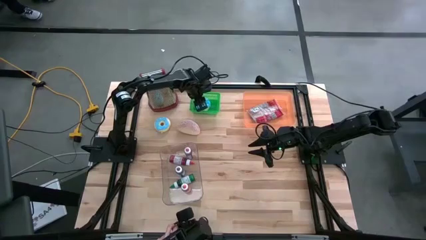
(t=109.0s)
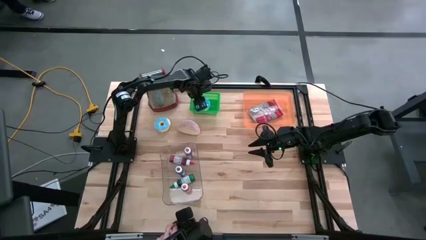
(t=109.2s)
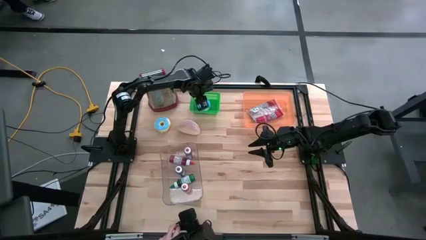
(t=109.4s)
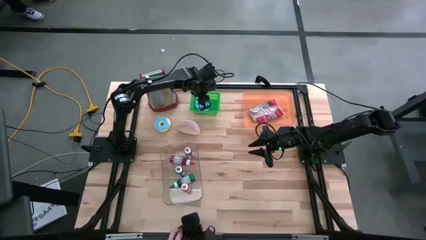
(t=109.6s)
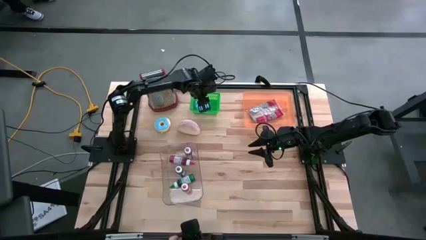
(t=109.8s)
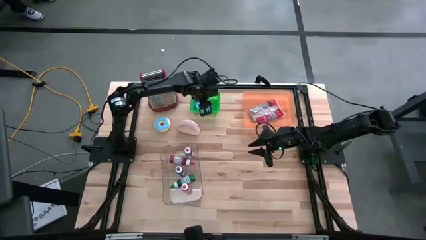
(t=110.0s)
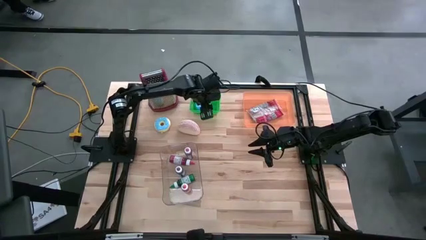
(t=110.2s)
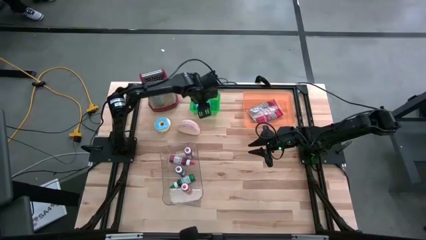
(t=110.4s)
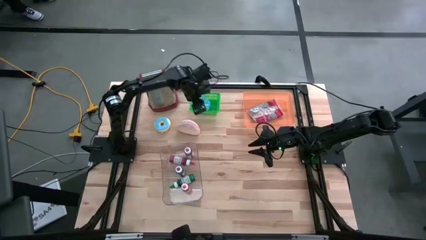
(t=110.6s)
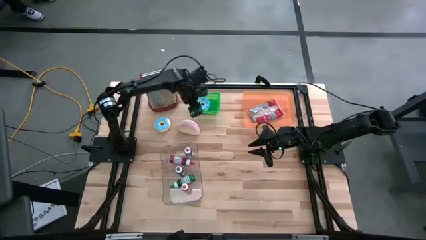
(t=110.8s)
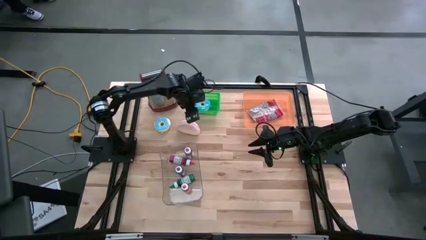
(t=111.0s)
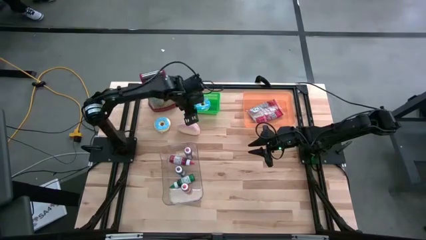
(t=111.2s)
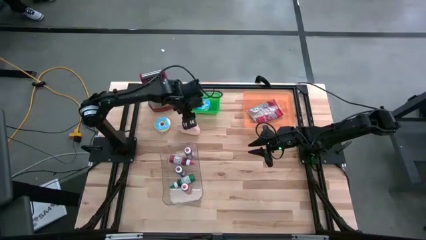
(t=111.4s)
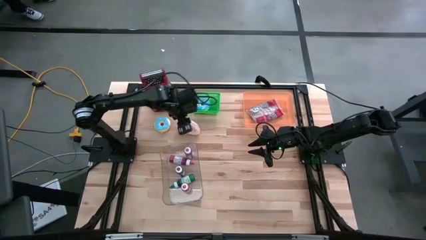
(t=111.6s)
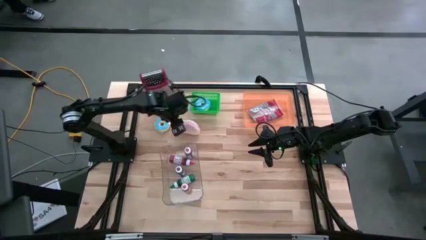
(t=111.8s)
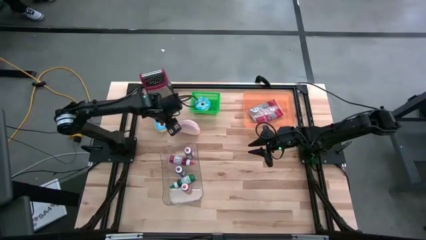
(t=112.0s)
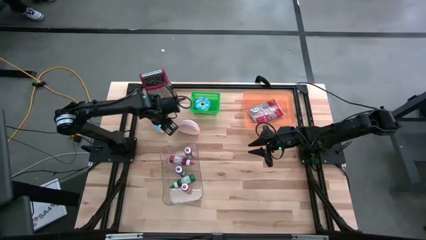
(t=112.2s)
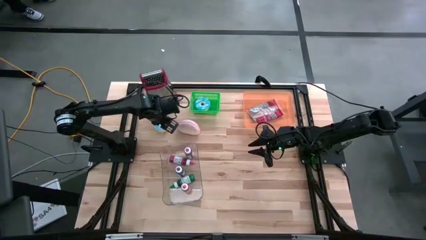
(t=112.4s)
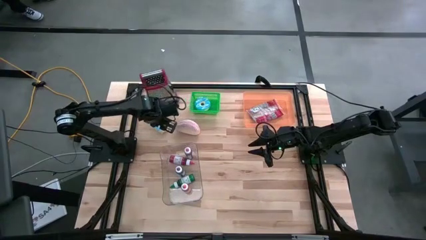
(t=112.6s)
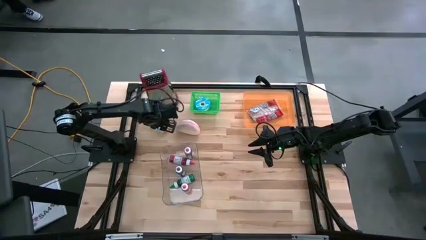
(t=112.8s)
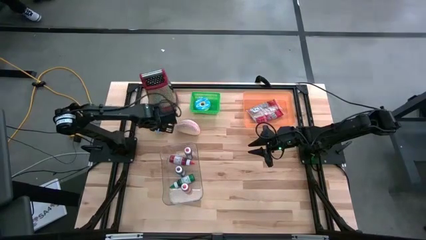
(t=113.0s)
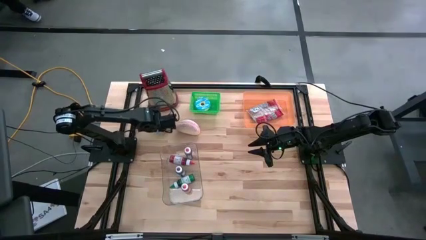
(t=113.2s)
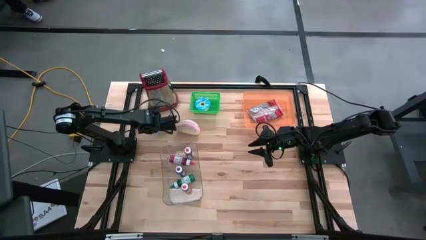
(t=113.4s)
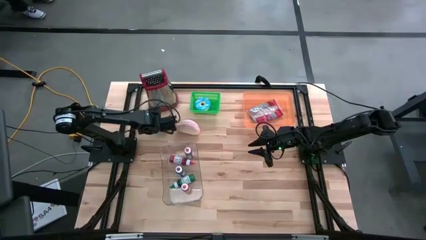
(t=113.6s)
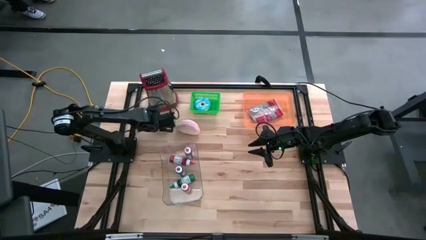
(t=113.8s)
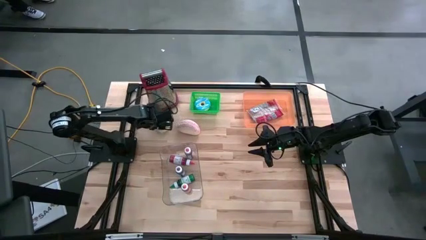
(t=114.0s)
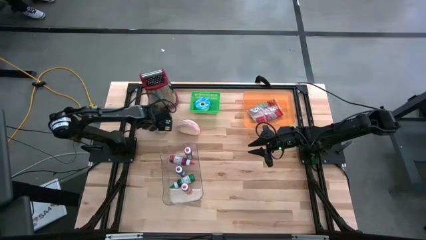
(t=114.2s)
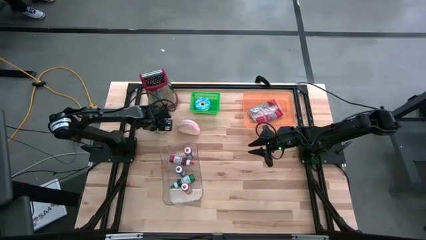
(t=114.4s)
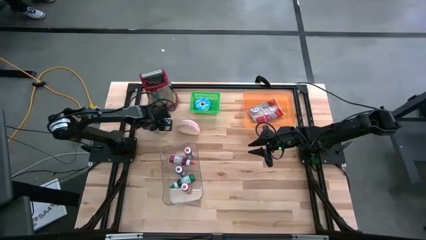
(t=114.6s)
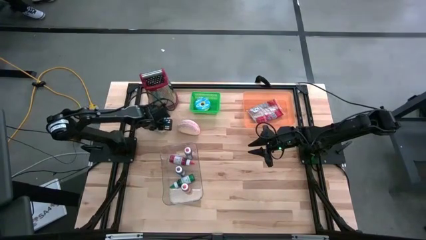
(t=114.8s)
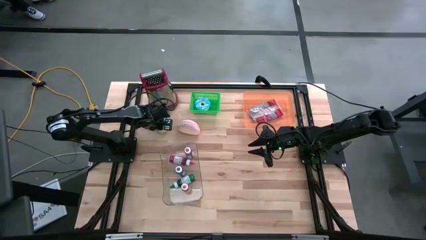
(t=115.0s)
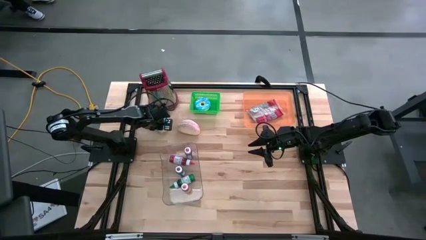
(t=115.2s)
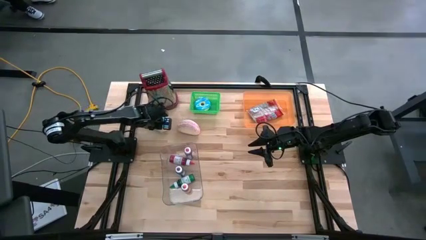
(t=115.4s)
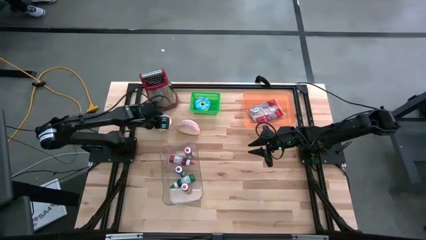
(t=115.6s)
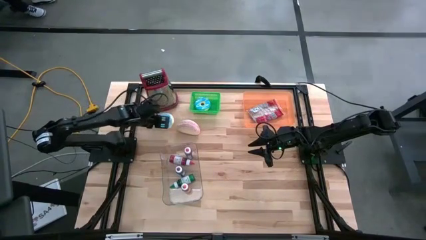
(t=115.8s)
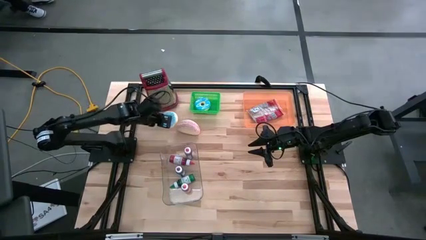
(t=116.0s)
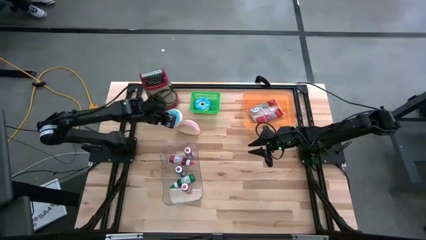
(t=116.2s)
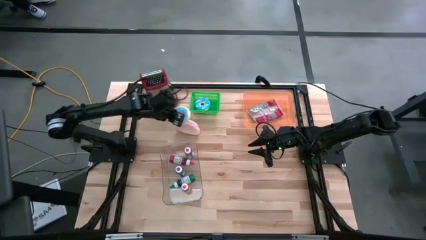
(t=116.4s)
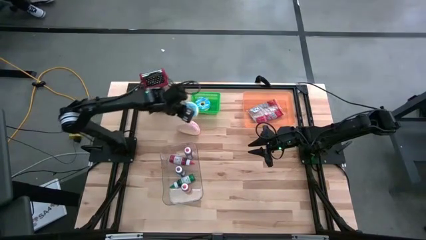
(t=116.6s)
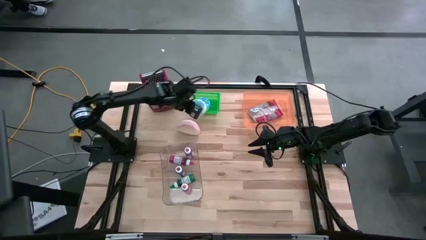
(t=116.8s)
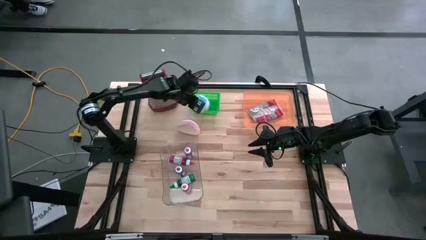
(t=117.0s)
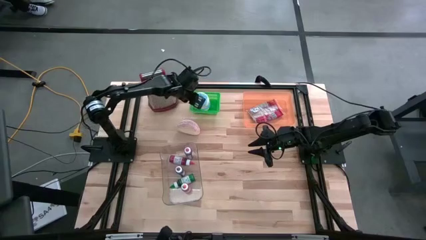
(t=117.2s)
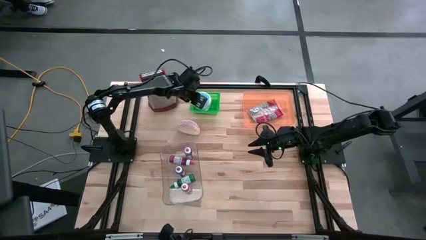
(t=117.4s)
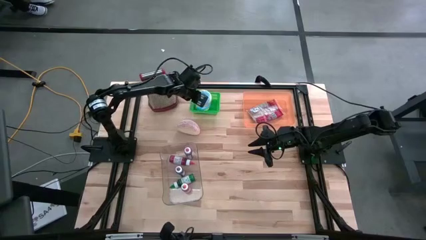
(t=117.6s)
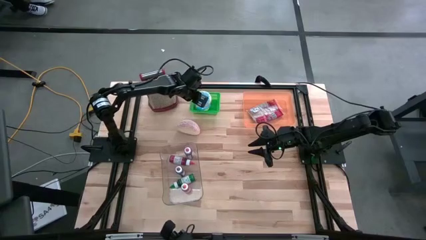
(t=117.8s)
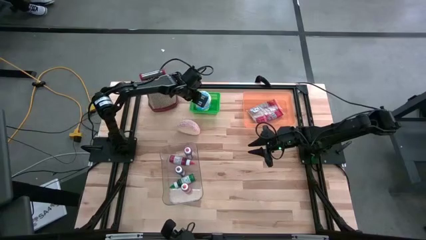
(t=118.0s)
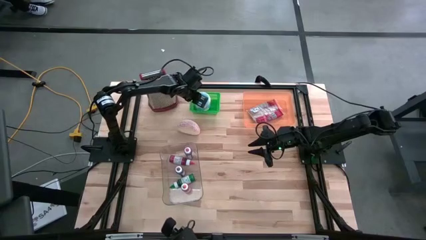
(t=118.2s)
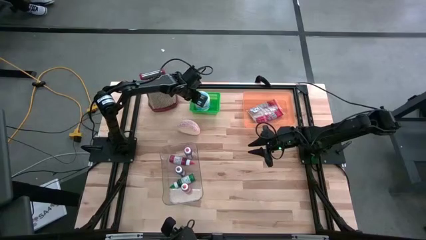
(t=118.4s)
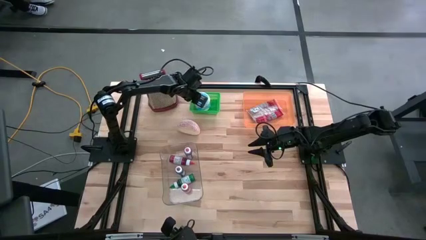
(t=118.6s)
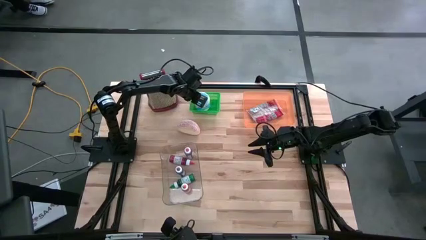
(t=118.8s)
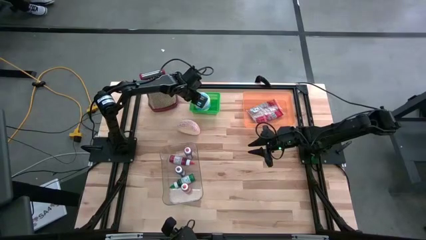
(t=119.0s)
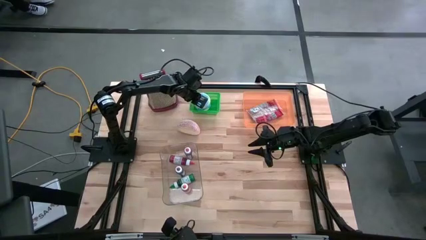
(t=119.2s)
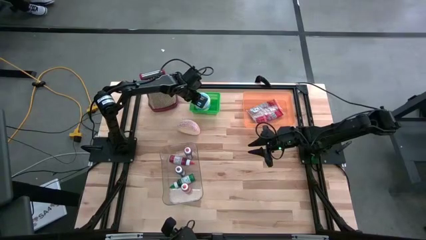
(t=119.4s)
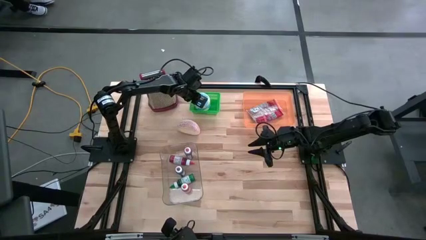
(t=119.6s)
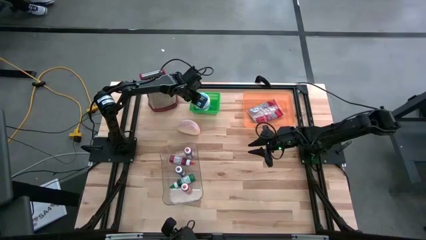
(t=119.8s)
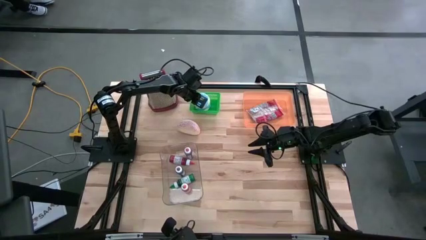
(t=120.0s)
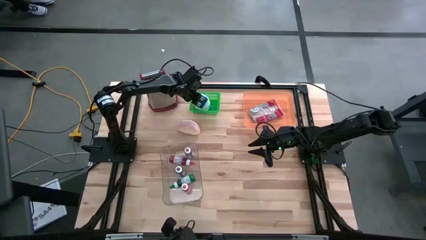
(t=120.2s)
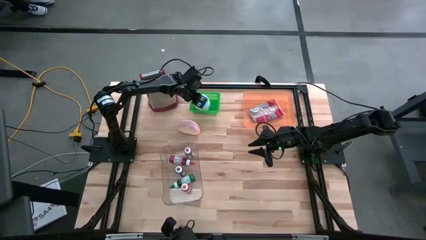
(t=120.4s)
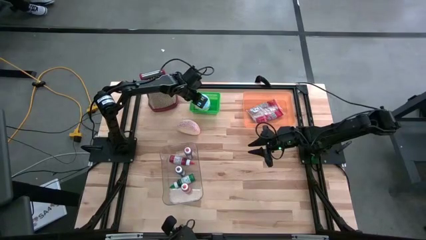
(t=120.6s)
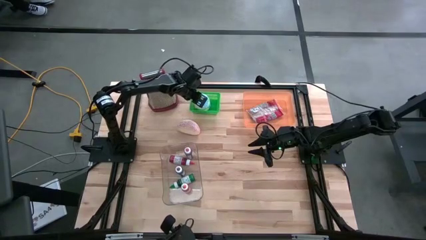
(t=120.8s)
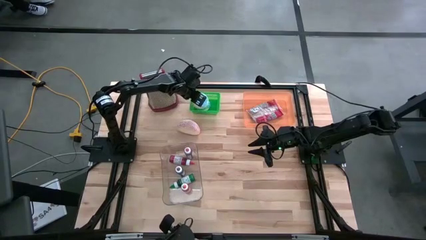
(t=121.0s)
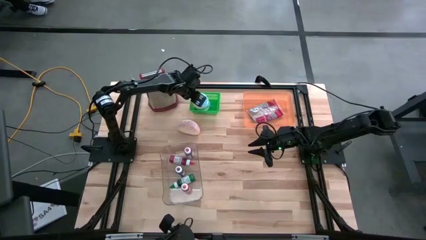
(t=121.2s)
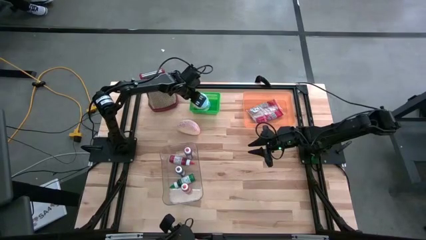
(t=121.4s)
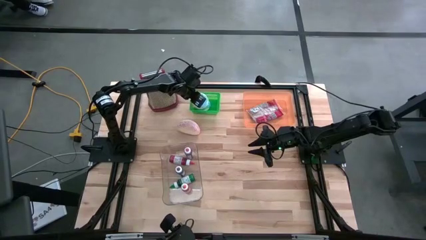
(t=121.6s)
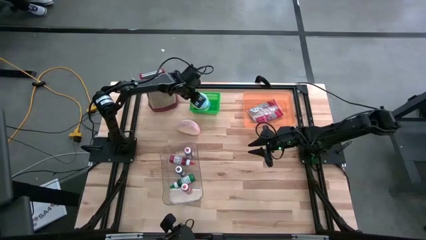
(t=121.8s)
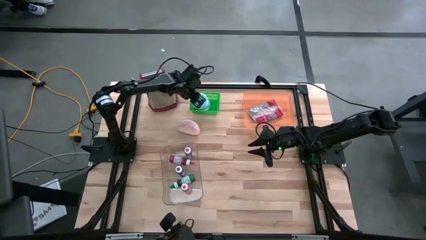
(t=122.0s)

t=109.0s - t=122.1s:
Put the blue donut into the green basket
